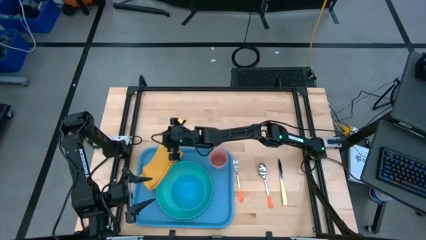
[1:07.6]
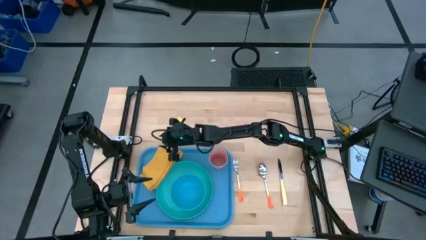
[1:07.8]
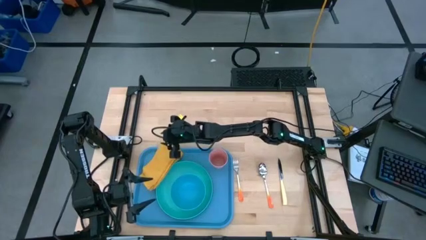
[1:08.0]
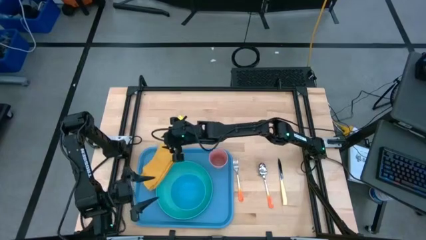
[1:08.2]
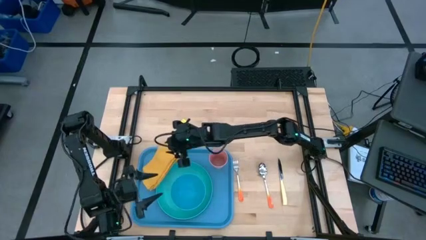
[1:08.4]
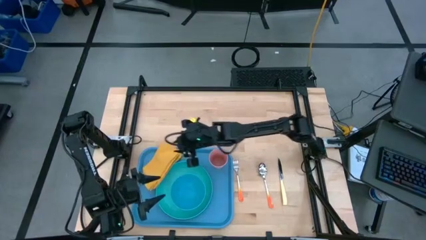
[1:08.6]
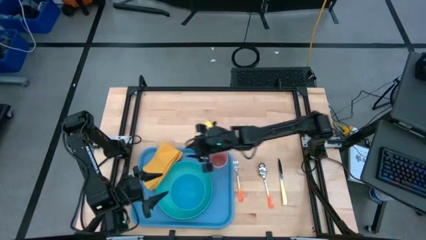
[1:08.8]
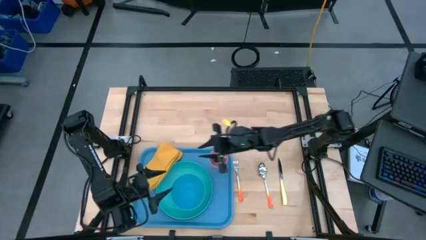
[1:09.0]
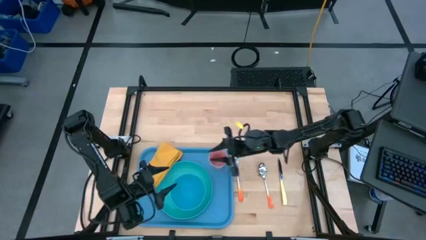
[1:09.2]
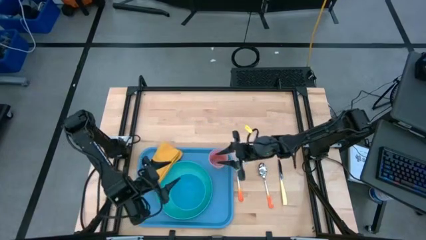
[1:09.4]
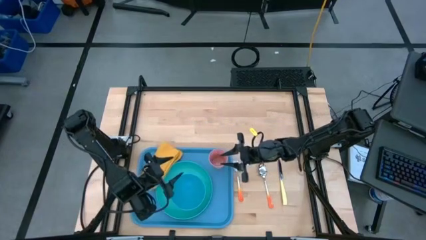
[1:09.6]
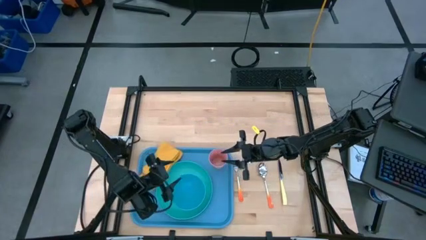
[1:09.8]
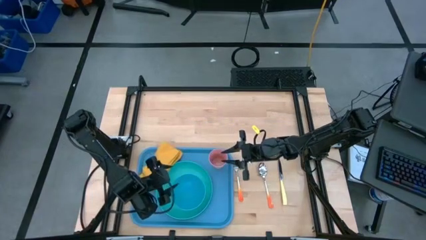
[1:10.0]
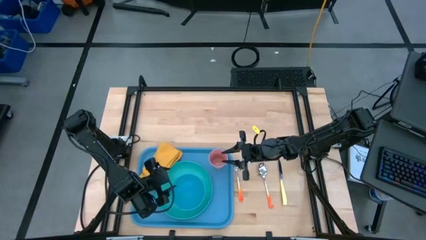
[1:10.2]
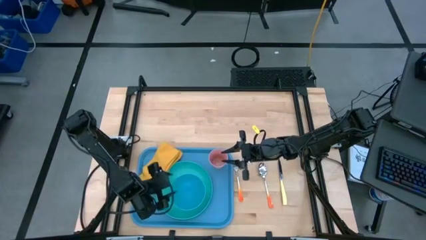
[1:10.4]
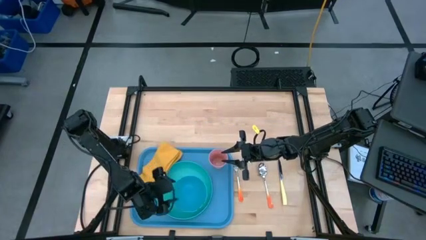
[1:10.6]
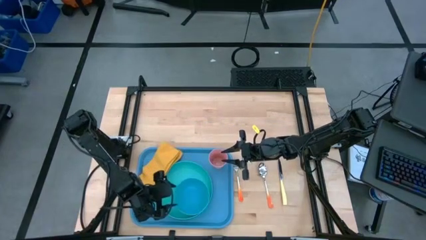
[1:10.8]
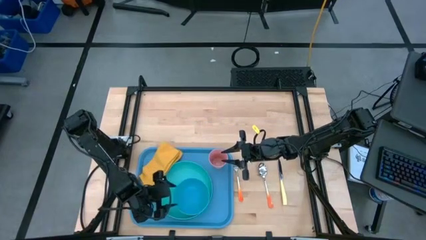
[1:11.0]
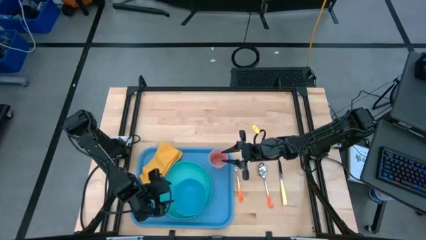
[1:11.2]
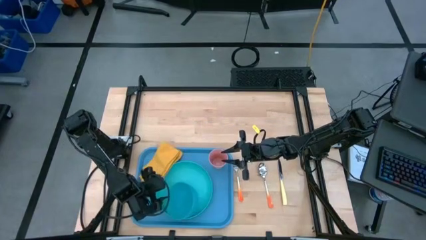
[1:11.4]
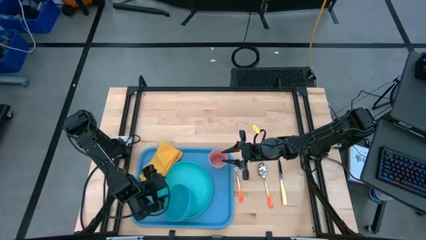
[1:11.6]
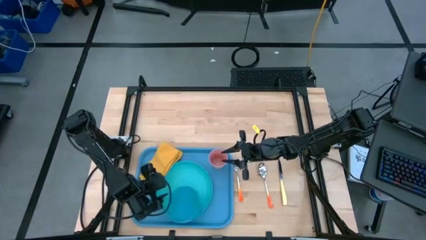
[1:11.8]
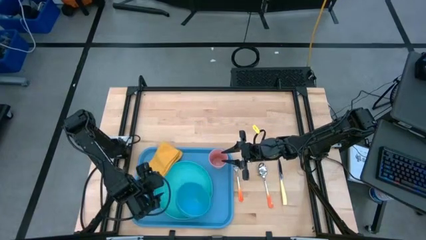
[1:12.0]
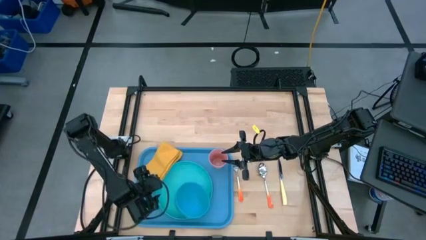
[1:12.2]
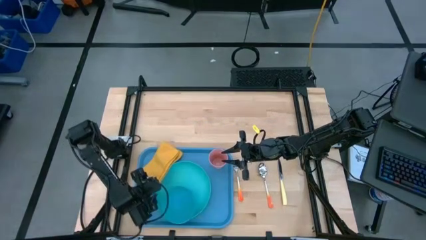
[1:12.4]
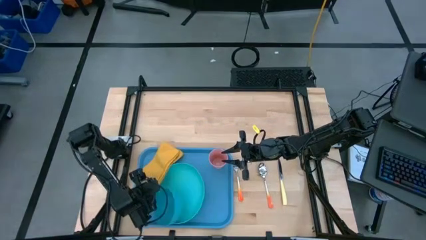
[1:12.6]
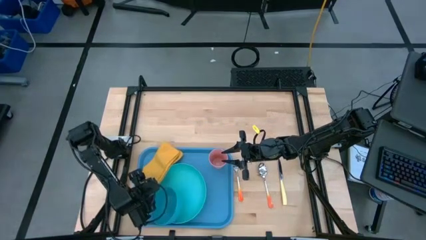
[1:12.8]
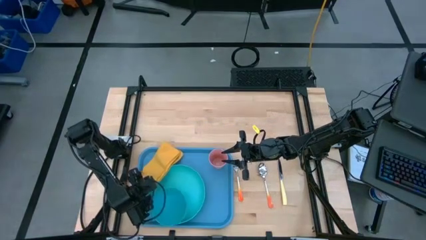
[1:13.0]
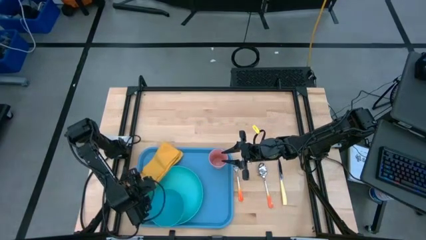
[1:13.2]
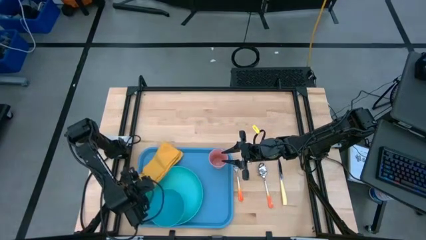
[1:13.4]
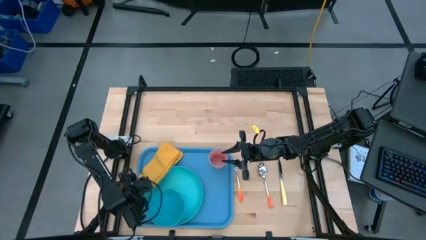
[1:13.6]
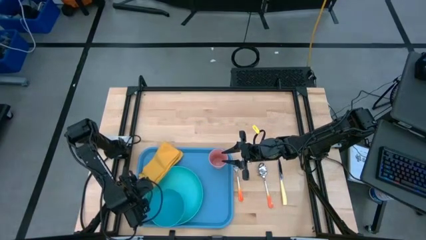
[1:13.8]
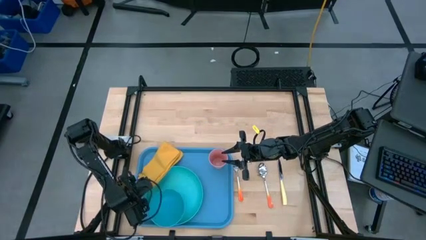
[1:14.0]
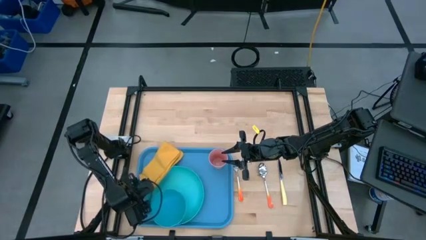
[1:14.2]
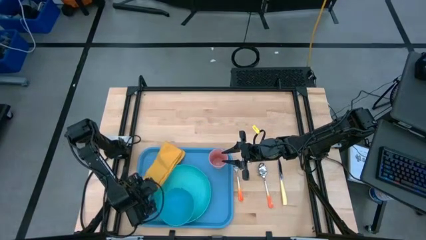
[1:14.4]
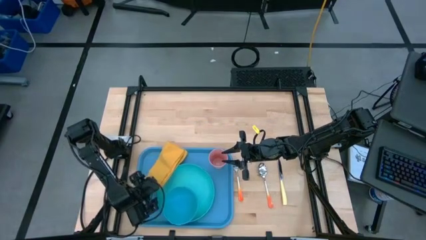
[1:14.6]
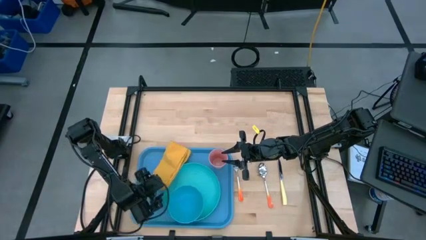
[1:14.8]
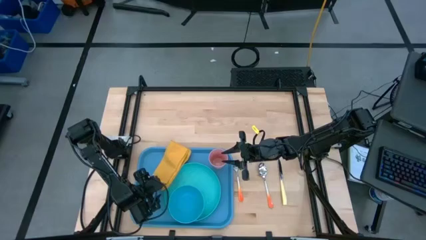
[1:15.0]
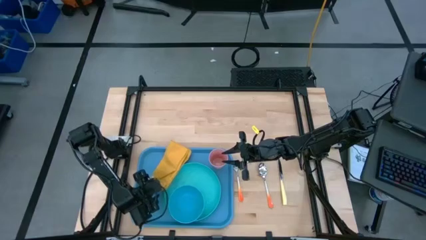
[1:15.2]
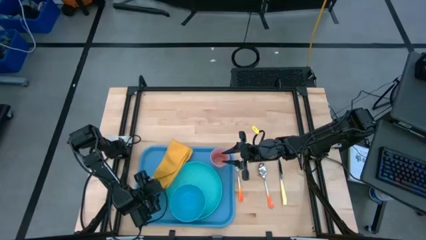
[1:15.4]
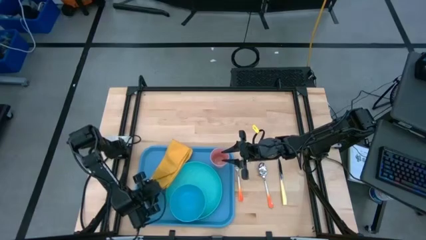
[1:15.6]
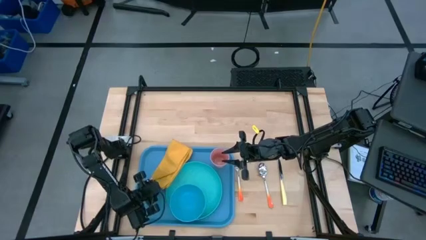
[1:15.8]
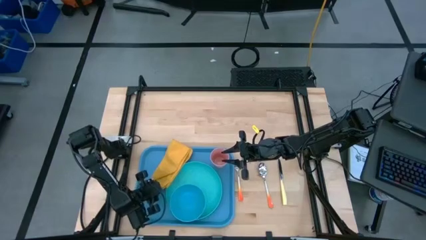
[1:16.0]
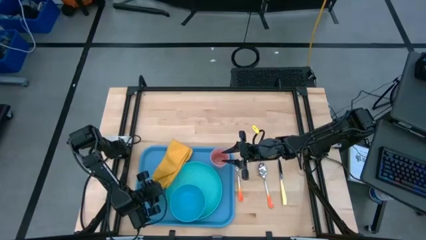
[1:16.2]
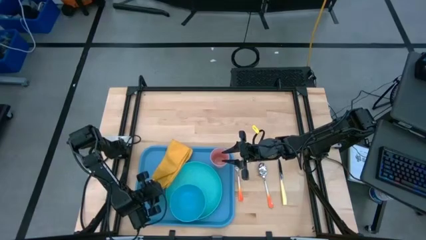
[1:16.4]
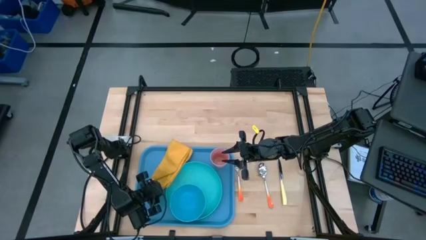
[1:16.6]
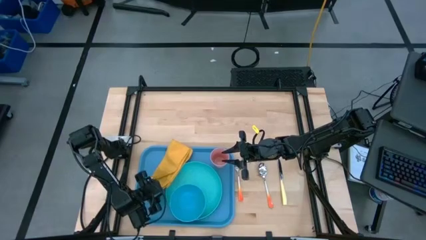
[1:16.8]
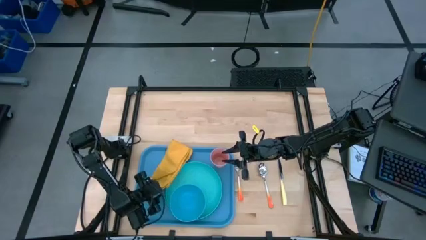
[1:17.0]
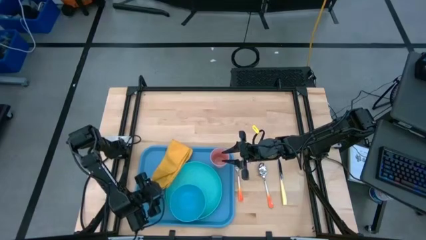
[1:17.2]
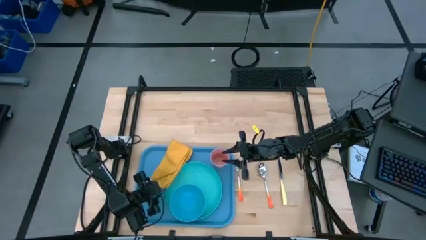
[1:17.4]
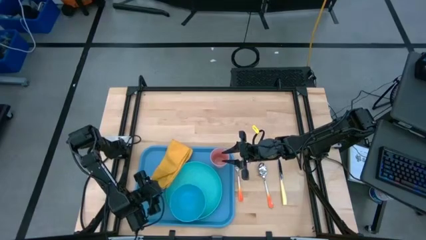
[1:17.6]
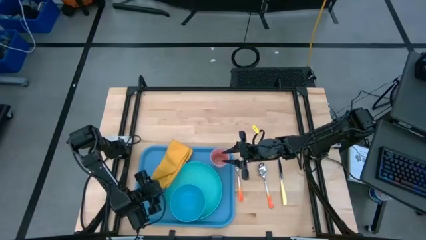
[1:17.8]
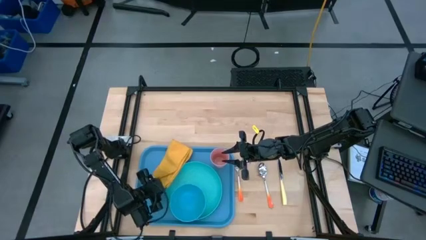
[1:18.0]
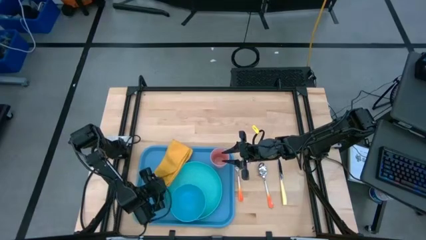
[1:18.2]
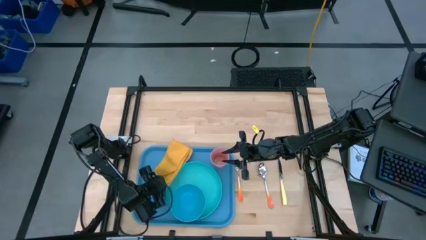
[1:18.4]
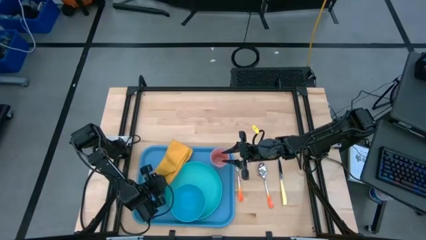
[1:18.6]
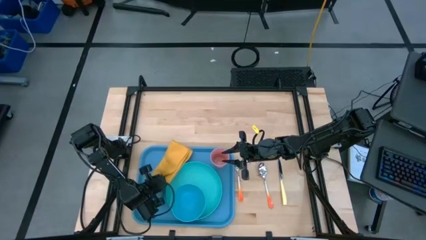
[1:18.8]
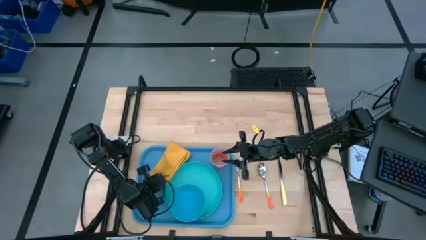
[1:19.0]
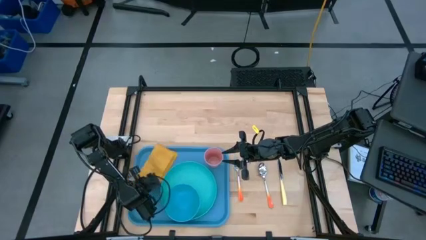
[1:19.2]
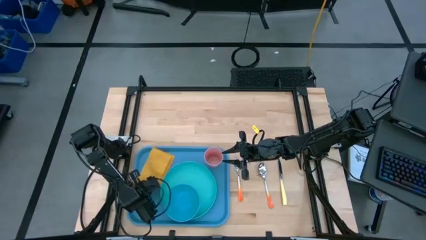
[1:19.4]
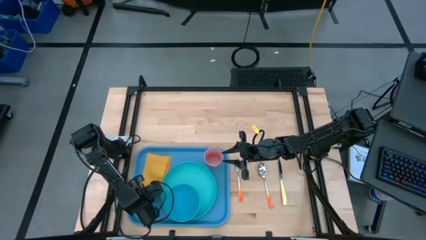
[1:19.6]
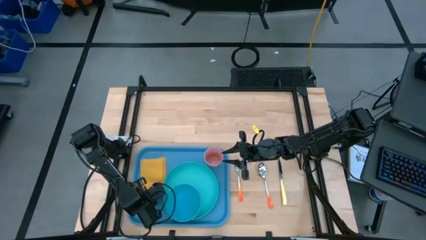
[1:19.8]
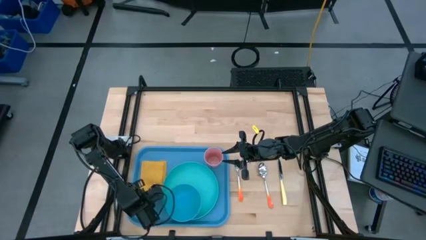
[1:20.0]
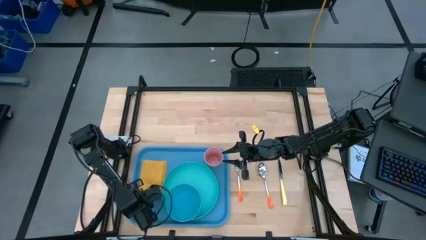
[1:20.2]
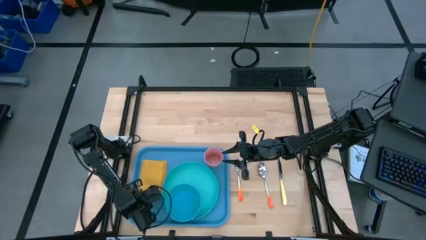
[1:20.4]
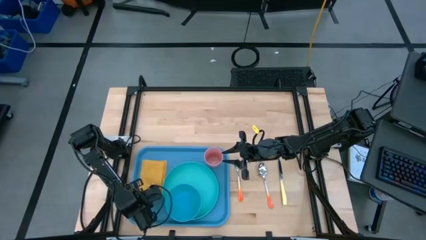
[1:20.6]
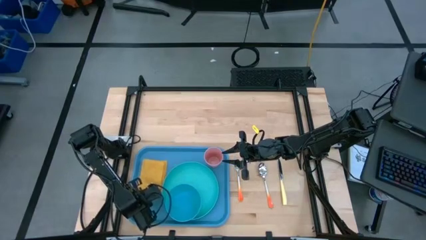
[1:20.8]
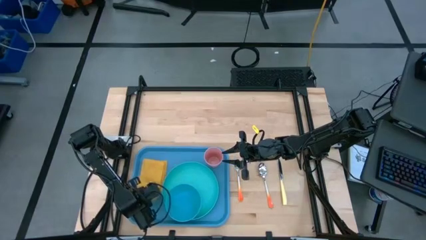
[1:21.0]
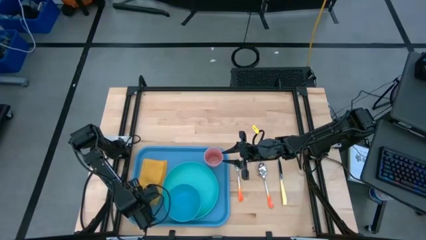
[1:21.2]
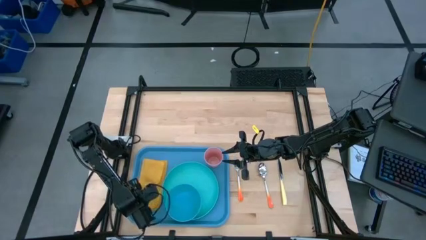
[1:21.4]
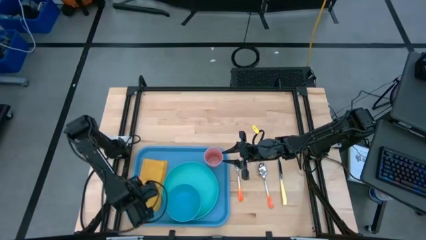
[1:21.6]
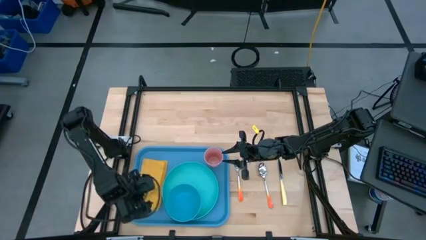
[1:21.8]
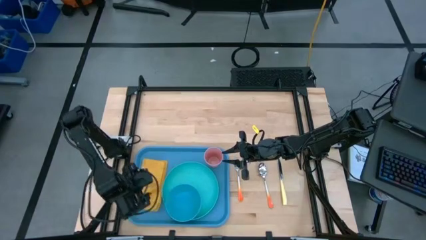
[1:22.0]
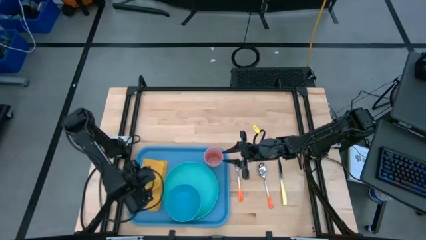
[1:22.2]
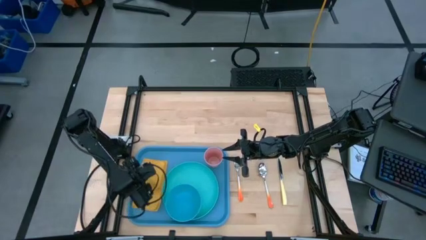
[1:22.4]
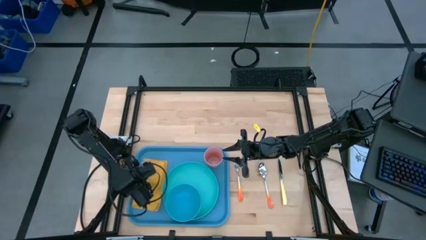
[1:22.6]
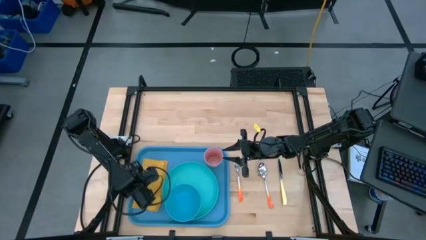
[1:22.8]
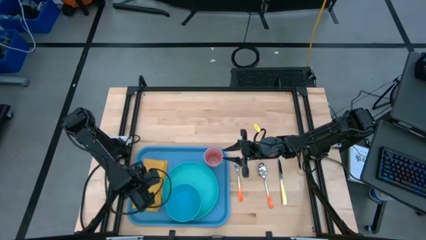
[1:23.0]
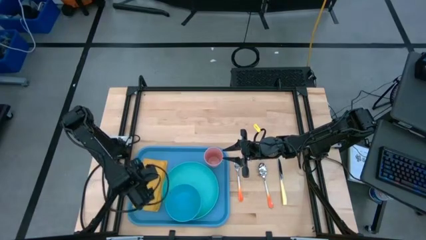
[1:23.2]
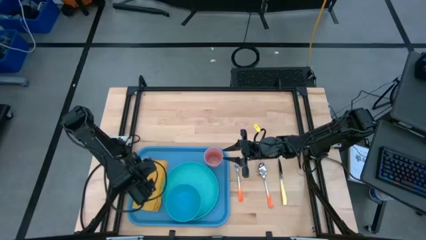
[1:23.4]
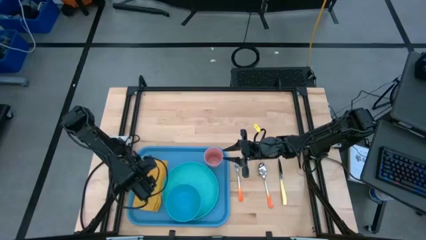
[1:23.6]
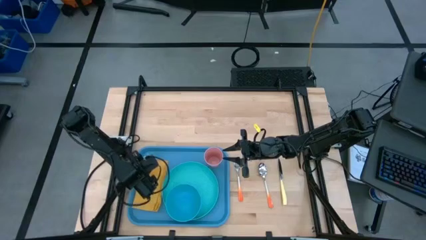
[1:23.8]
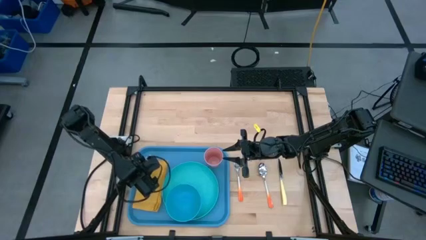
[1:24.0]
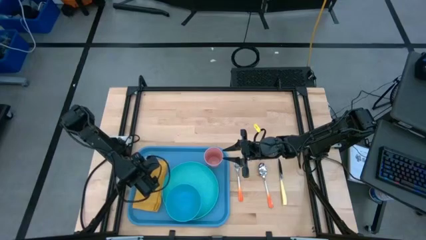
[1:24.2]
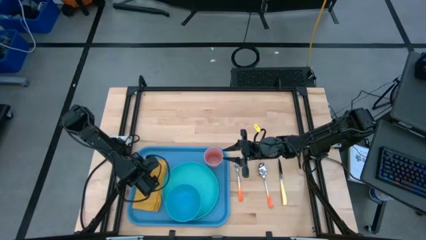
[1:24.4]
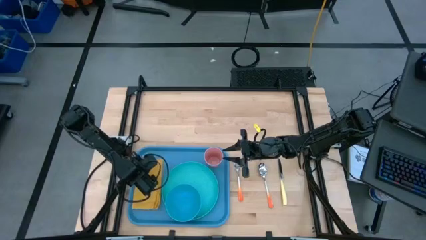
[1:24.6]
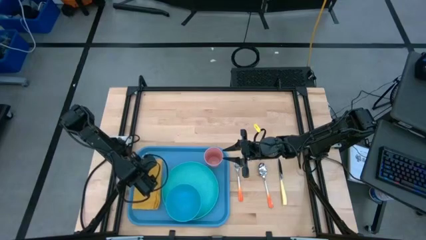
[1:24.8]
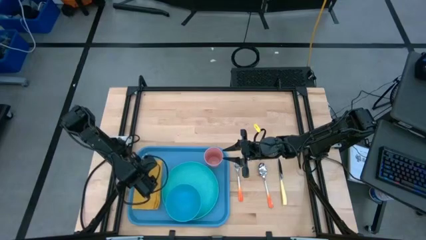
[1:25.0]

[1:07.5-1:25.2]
Task: Set up tray
Put the yellow table napkin on top of the blue tray to the left of the green plate
